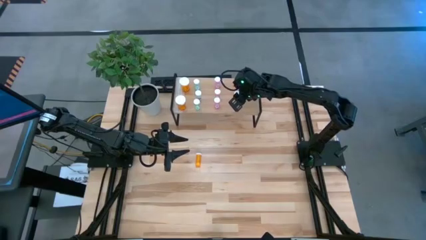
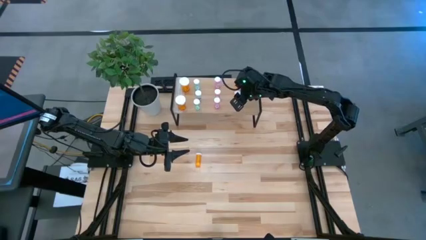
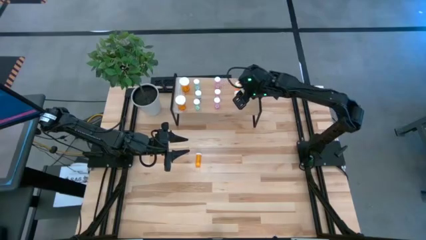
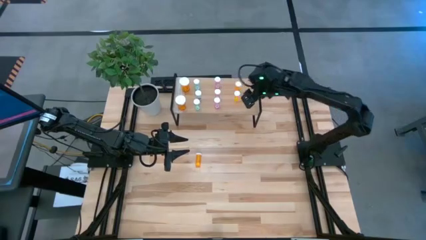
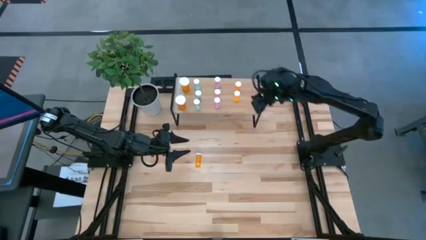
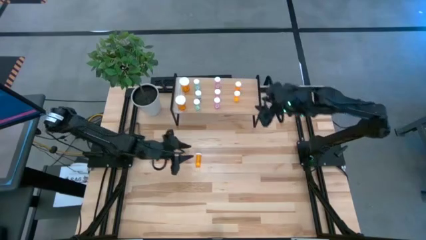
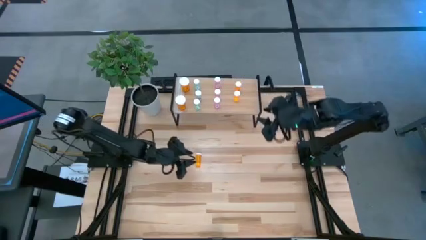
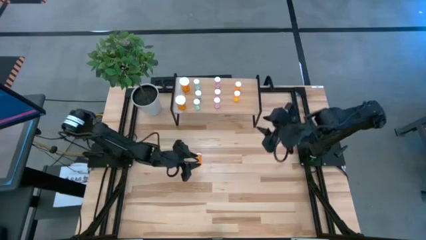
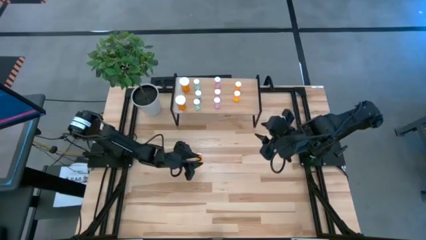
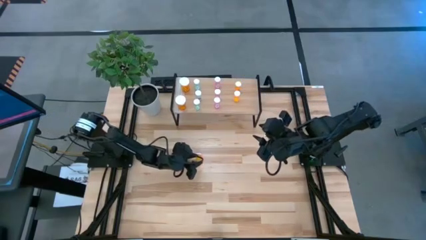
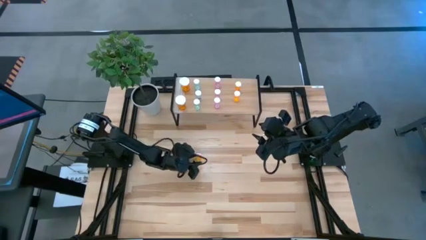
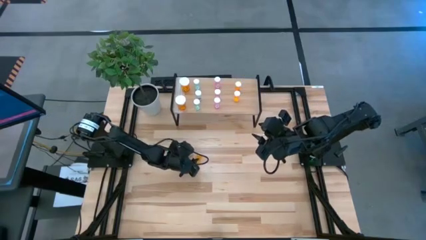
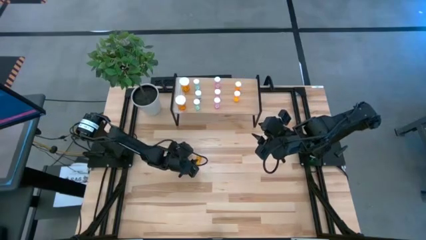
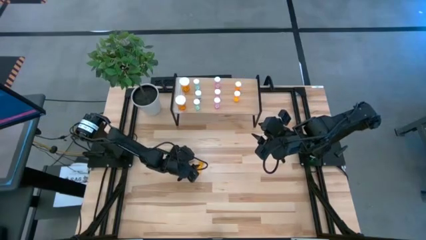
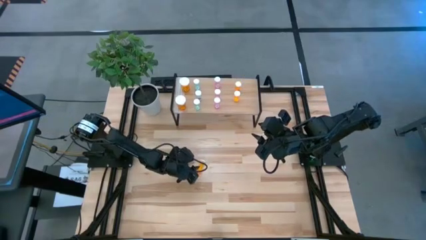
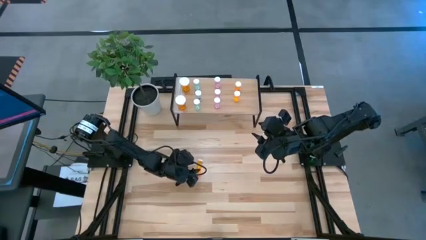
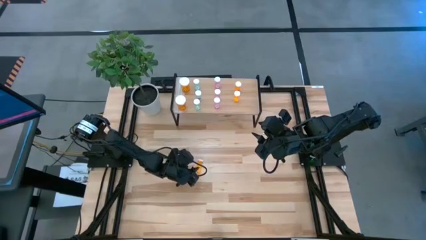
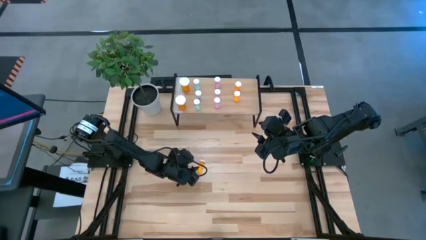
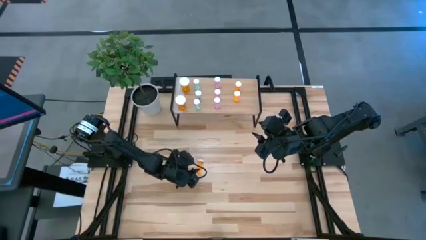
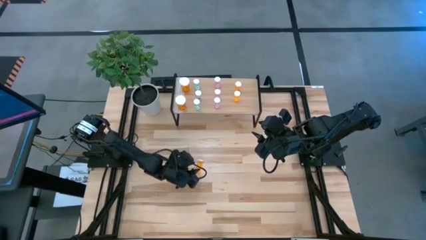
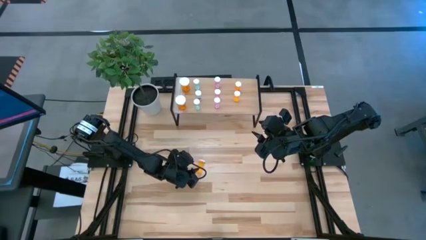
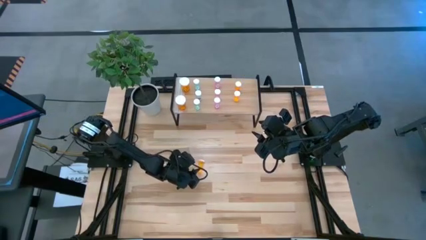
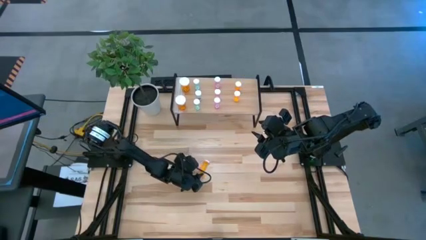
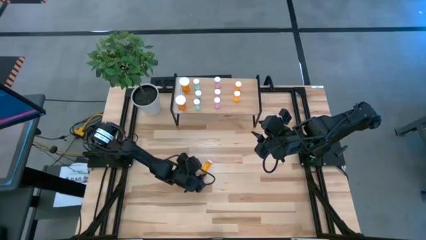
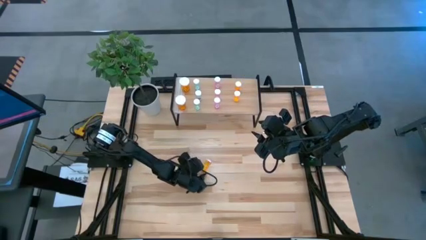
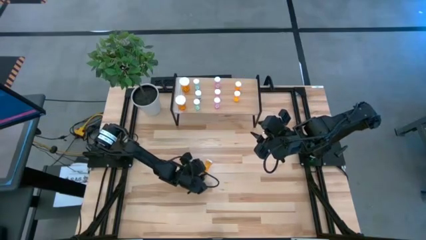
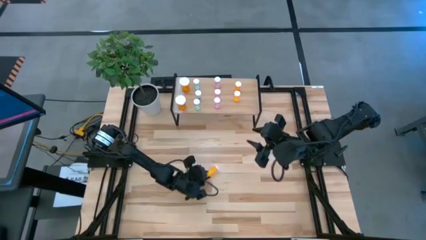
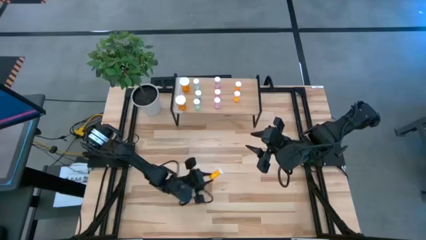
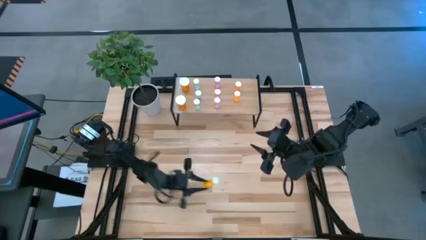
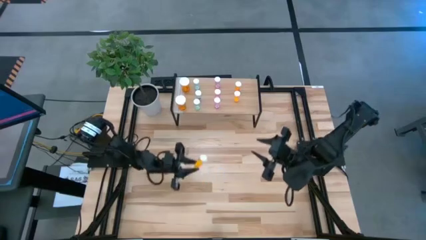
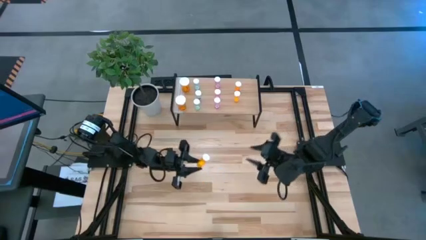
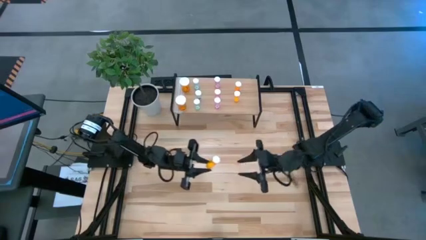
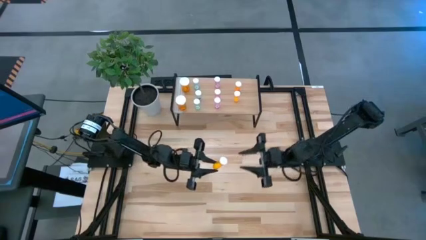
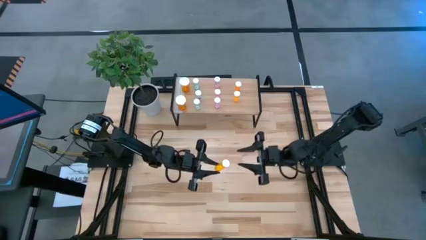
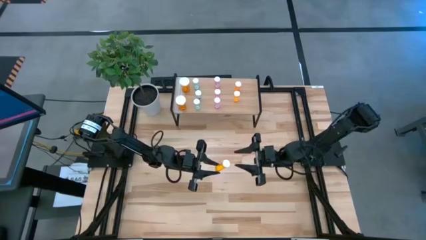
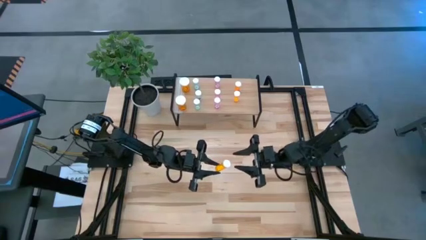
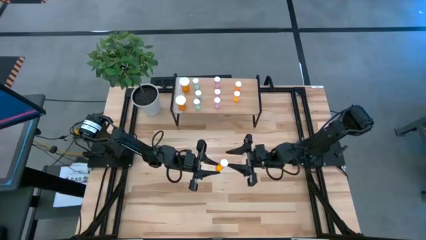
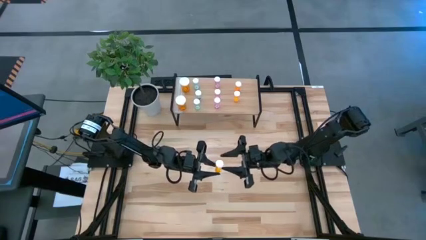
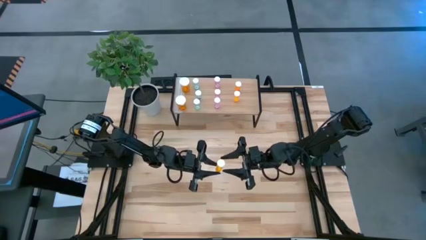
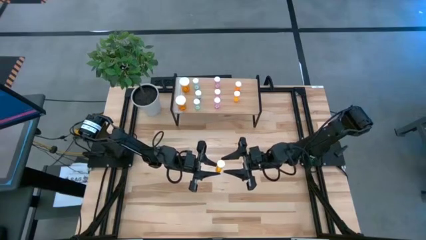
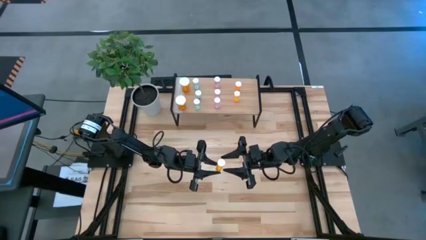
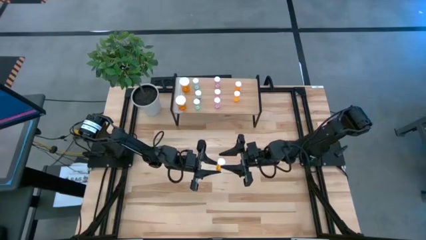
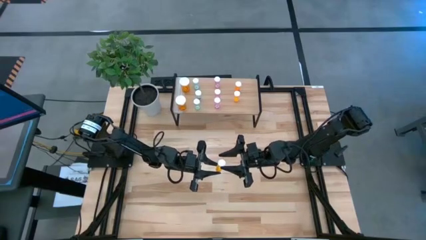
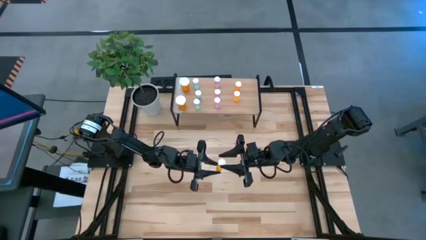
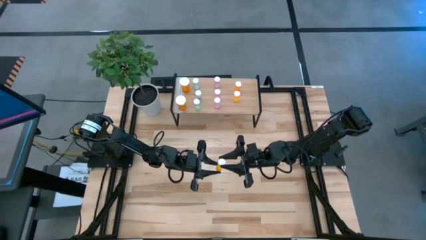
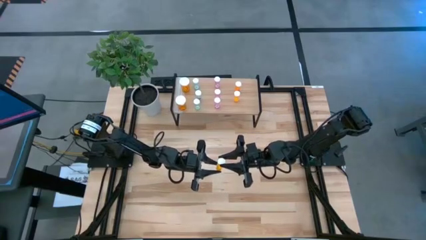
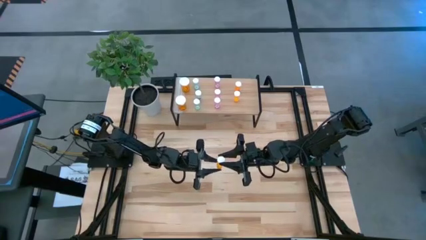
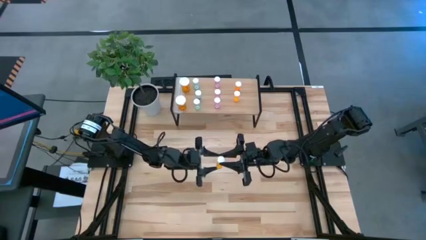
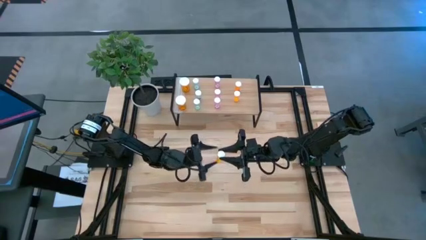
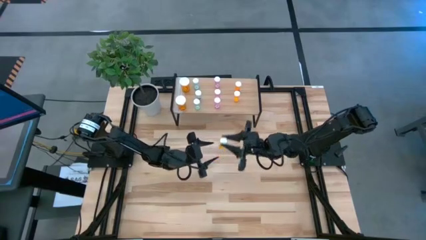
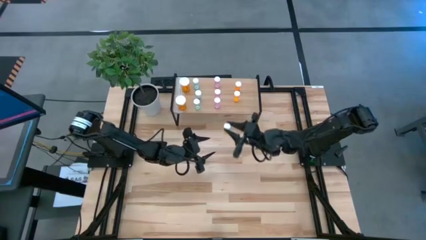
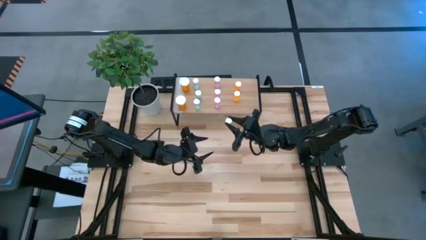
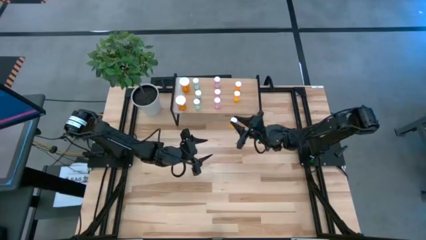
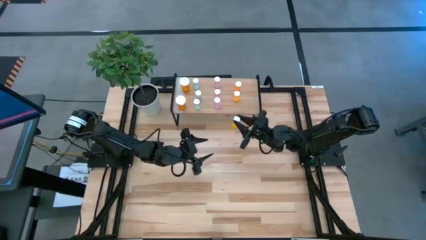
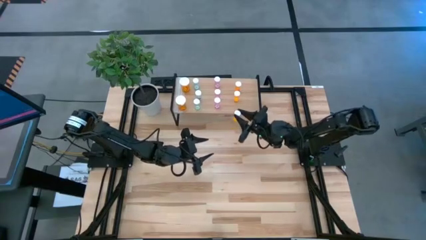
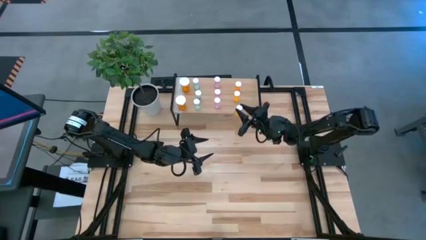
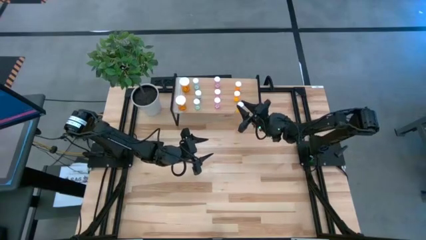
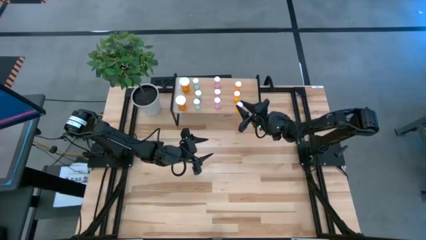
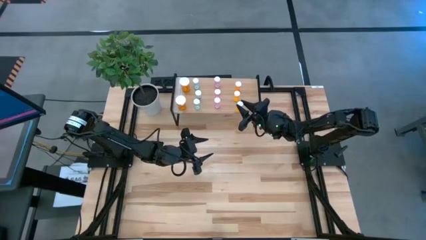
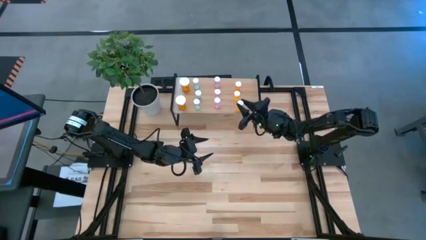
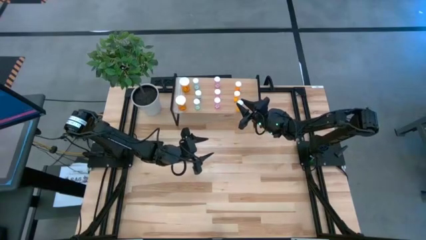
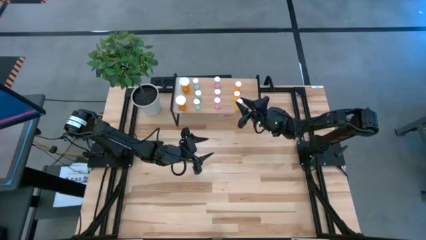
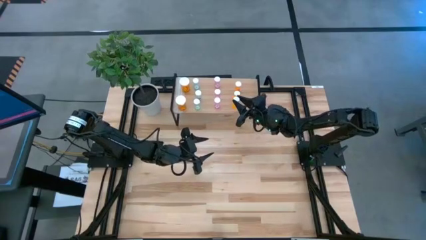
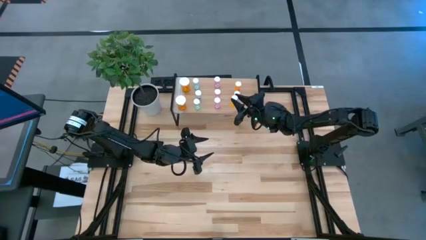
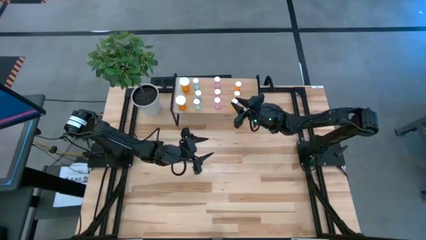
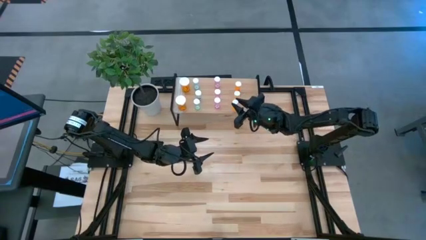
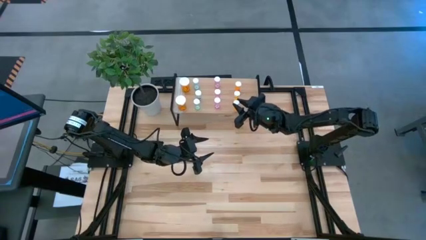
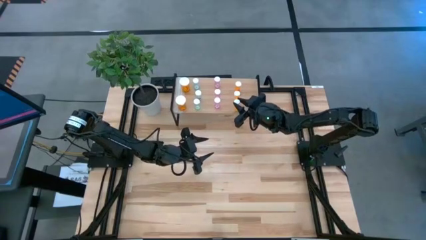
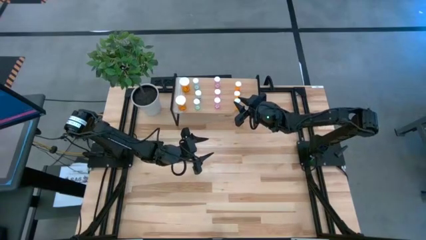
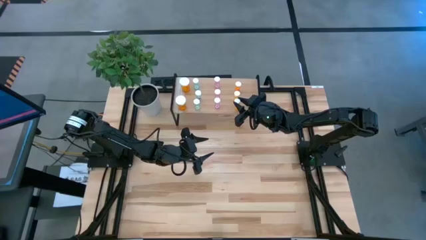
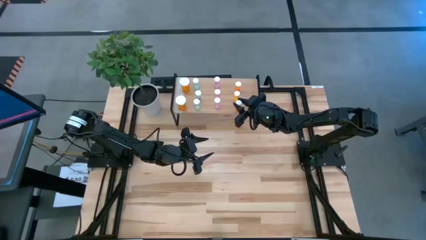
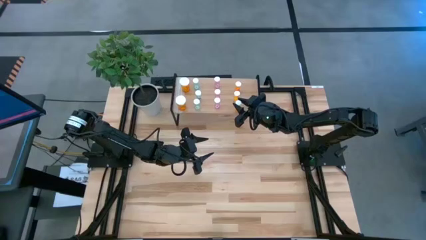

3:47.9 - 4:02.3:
Task: Pick and place medicine bottles onto shelf by color
Put the small orange pill bottle on the shelf aligned with the other small orange pill bottles
